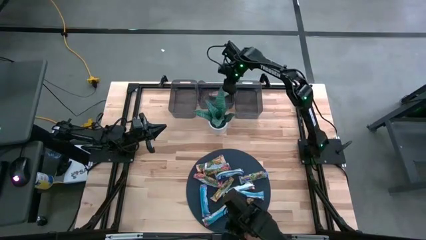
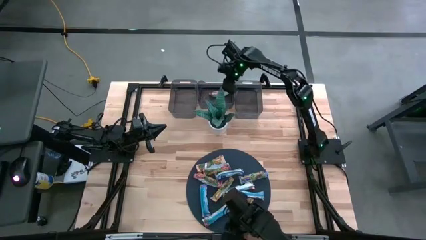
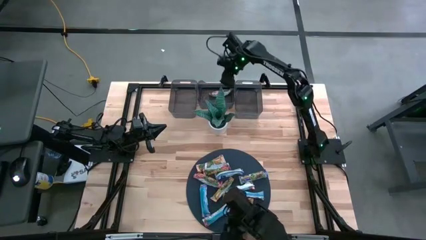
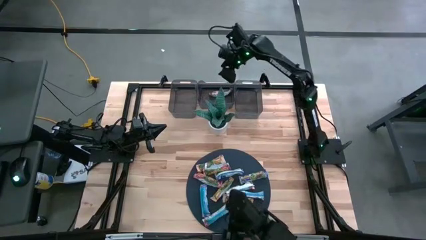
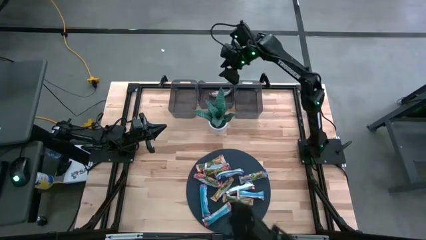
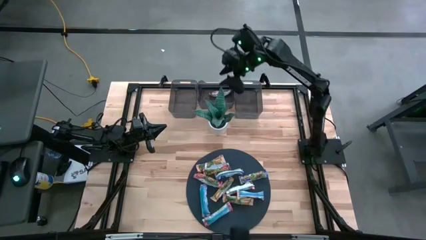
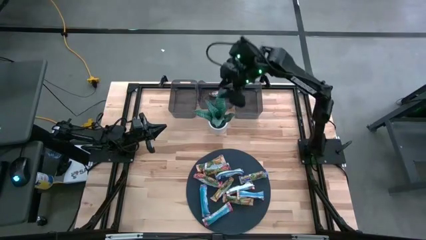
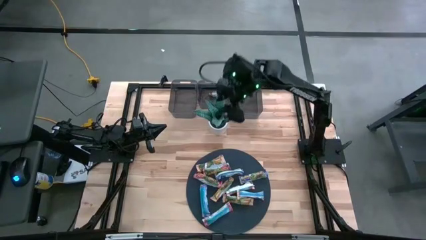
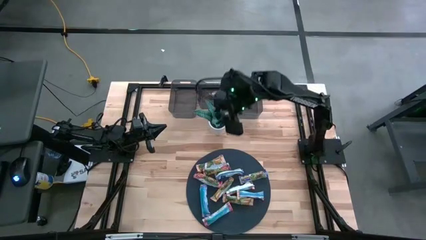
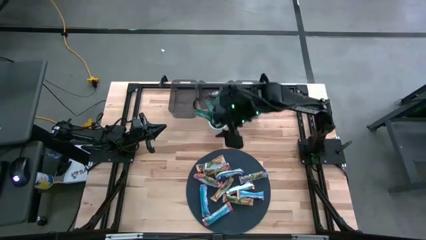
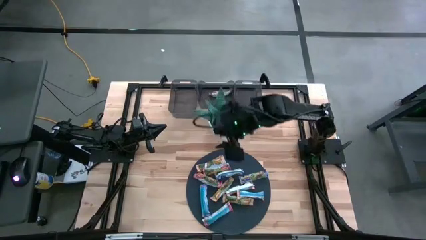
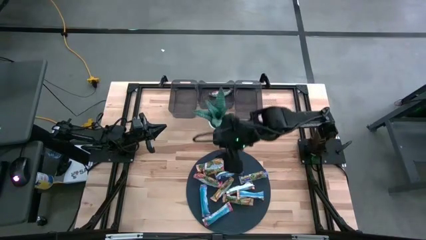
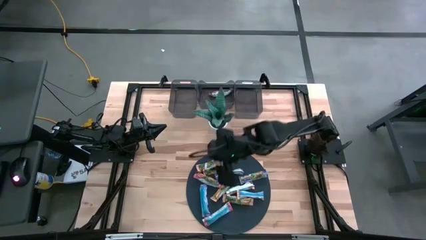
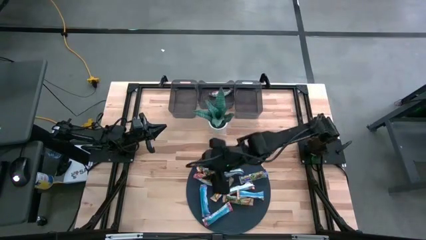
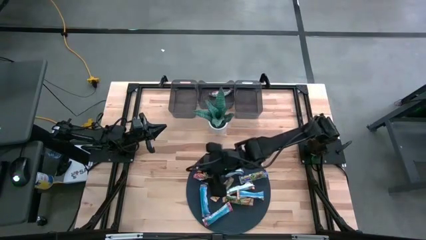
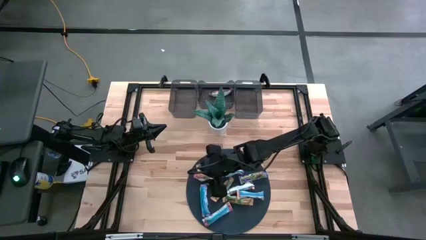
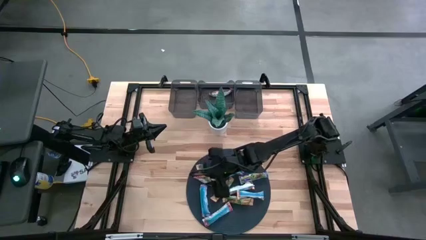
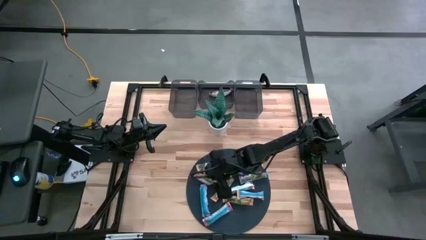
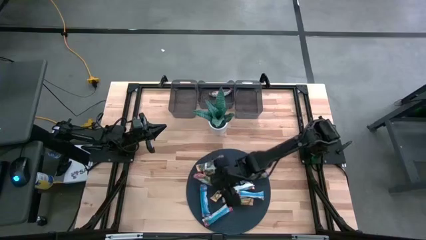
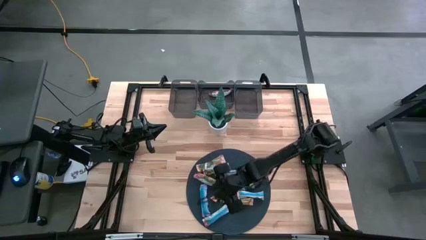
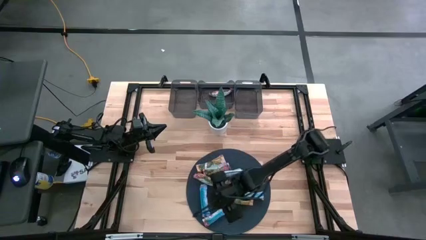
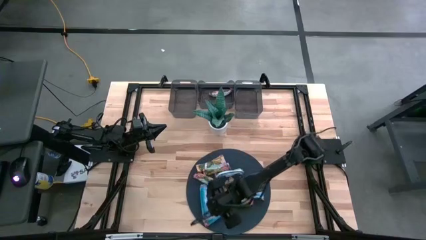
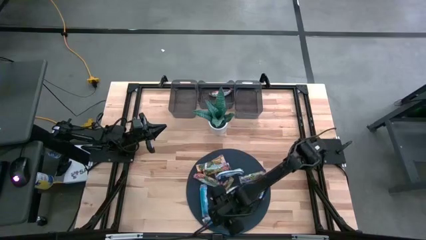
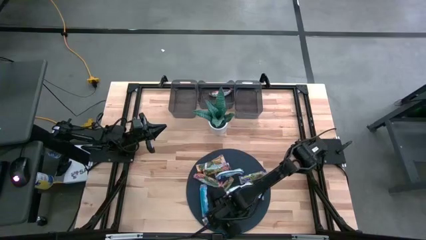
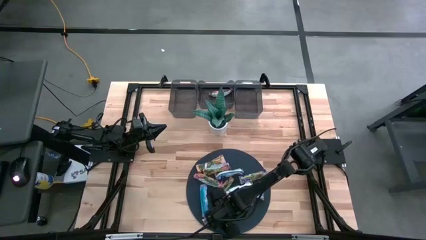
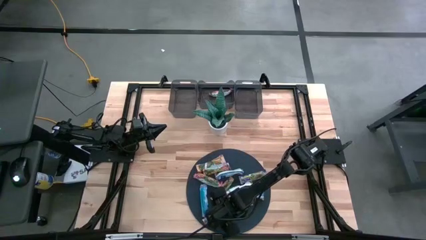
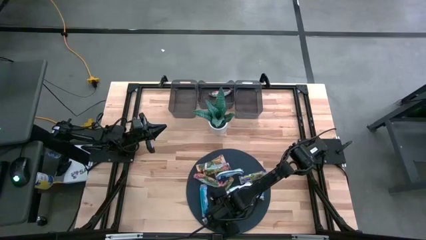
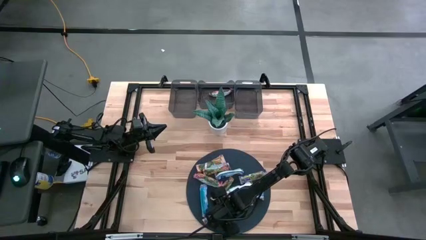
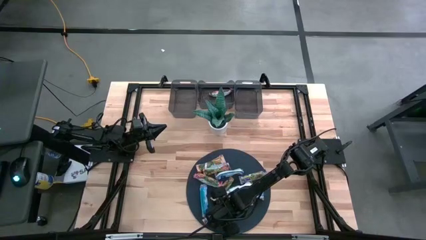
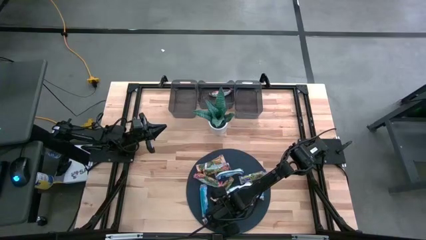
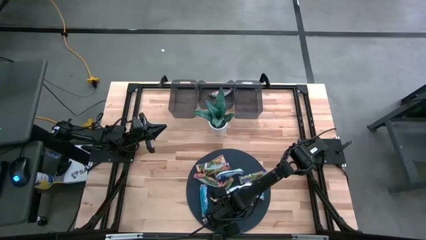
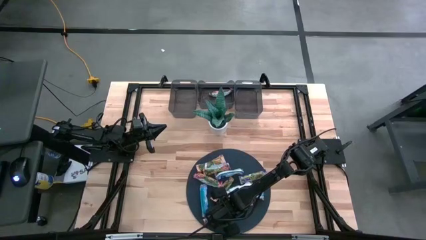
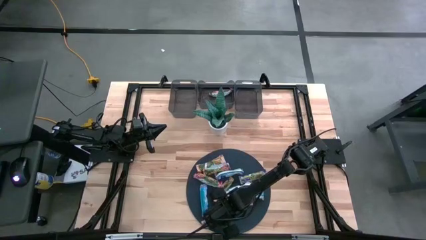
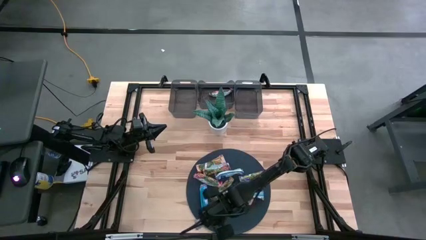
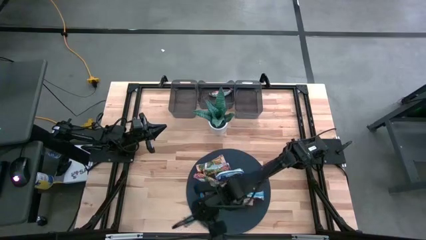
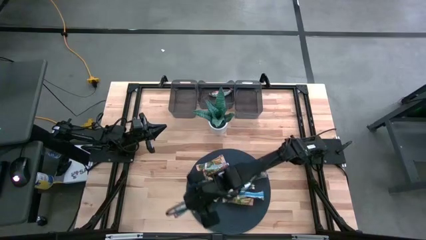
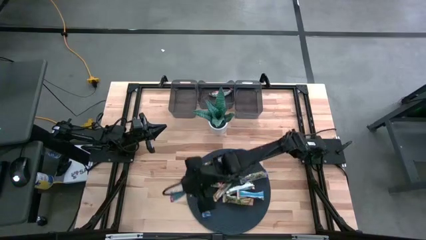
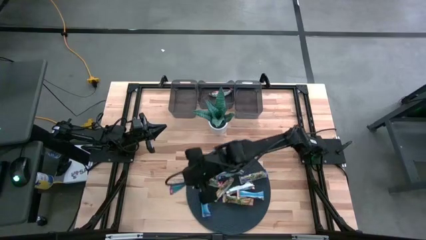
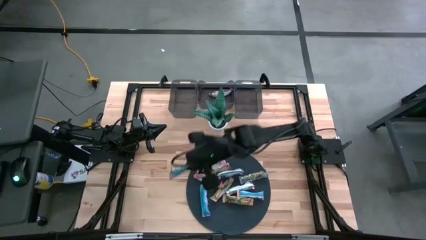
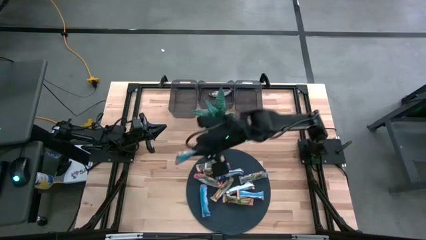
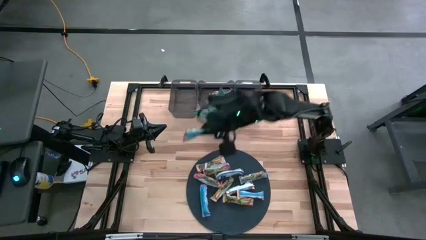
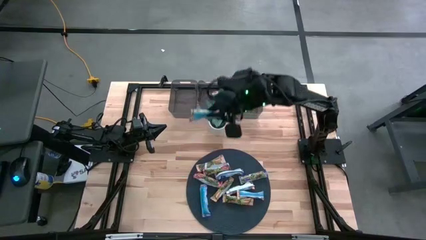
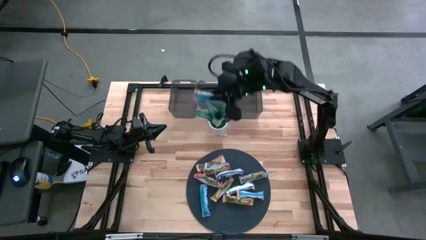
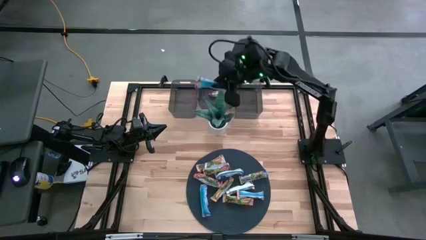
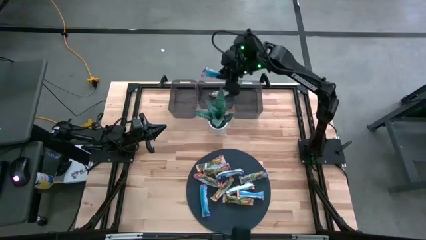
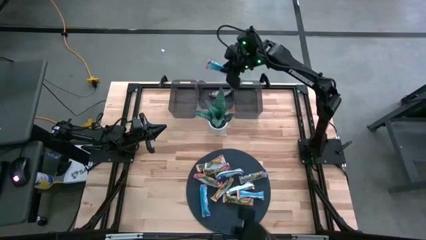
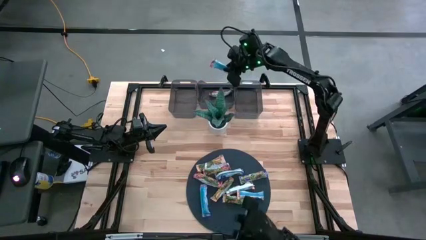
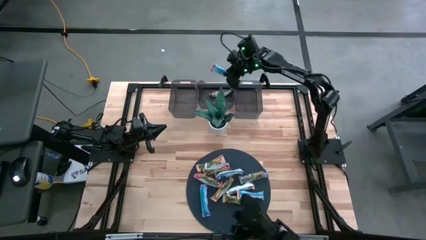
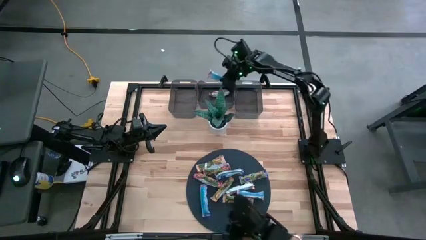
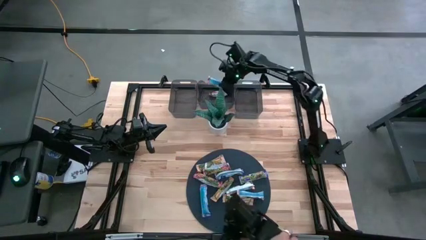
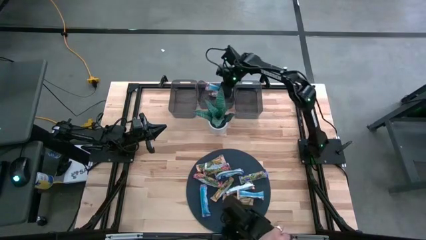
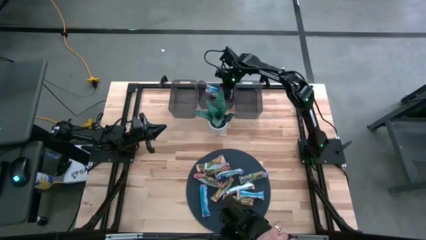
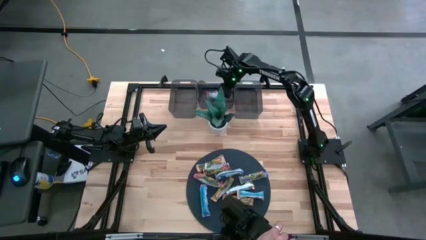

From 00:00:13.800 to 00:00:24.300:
Task: Pick and place Granola Bars by type
Put the red granola bar into the middle black bin

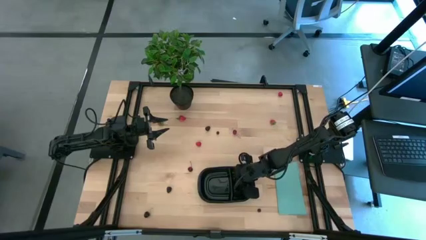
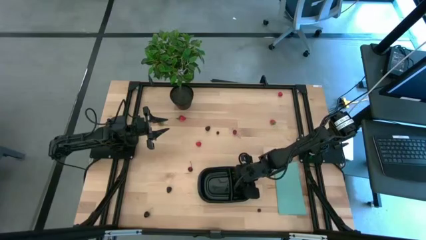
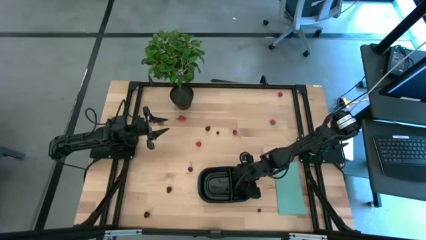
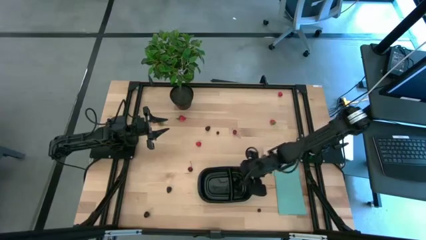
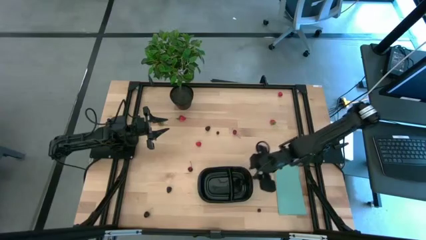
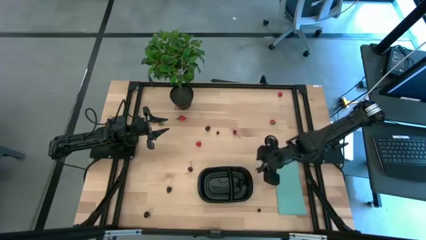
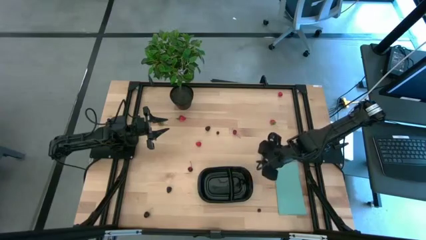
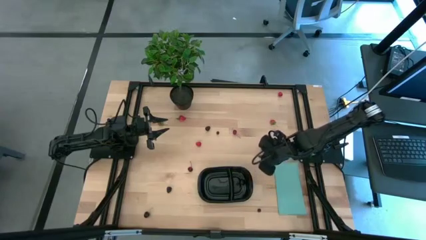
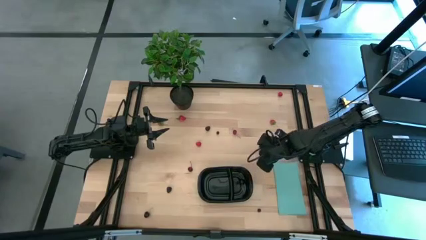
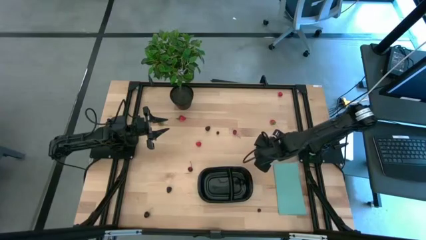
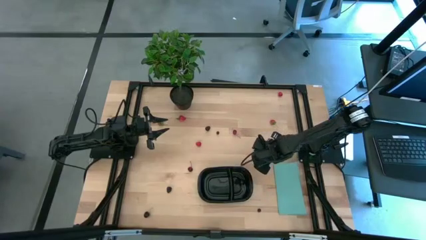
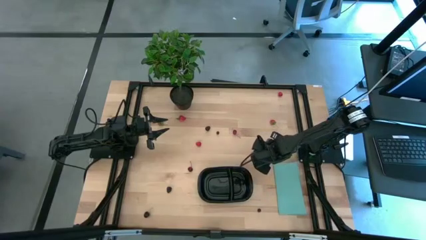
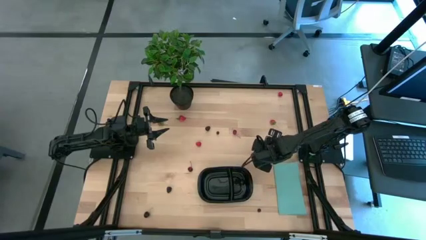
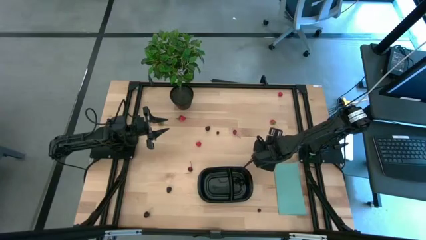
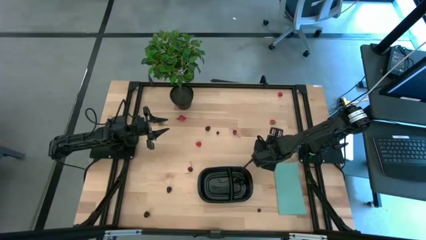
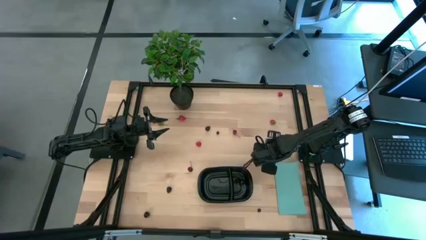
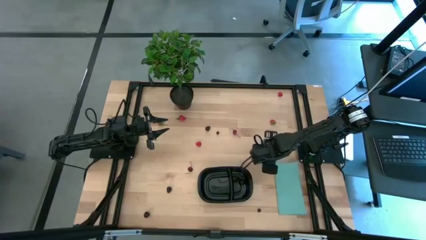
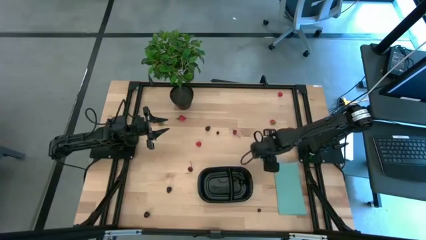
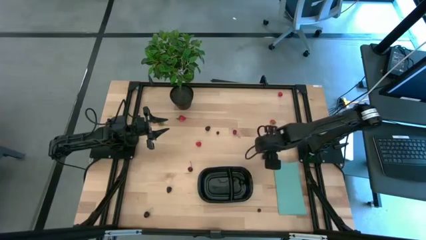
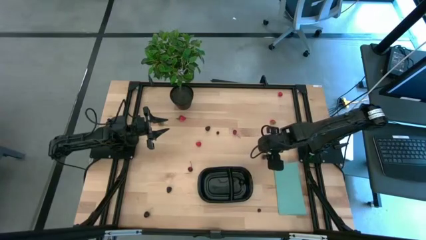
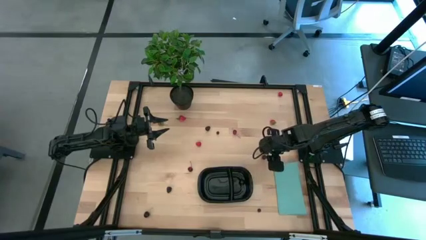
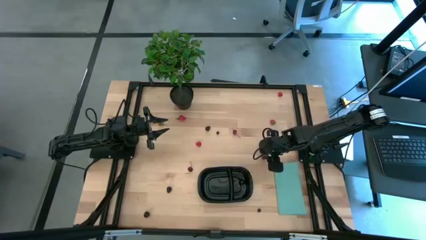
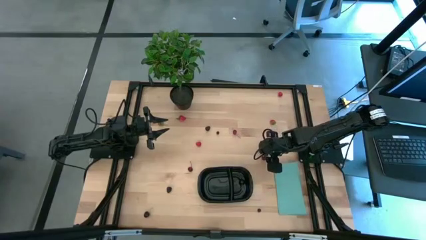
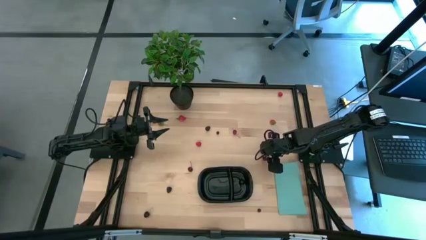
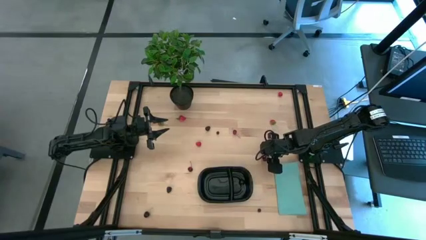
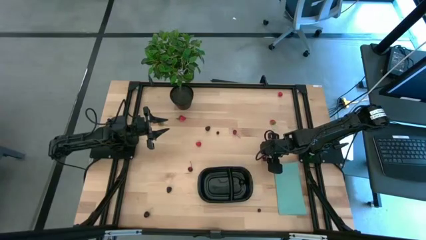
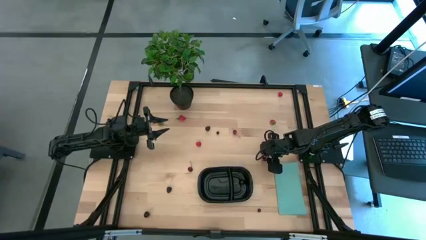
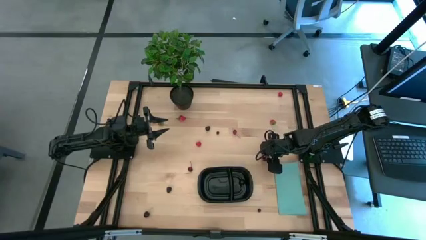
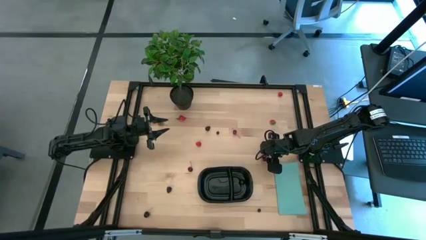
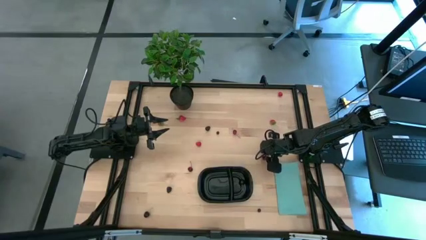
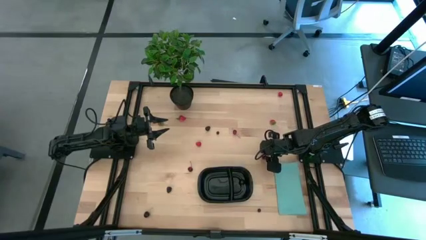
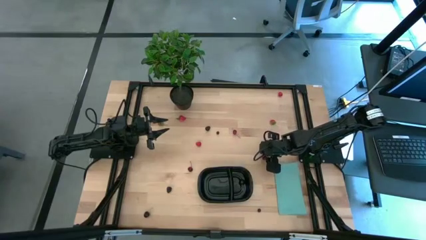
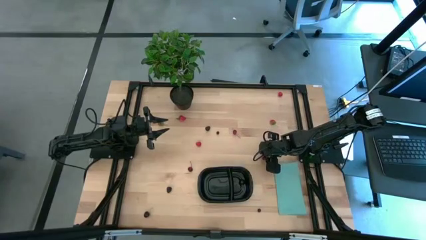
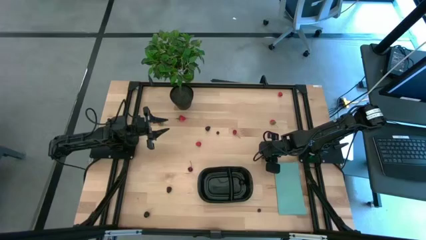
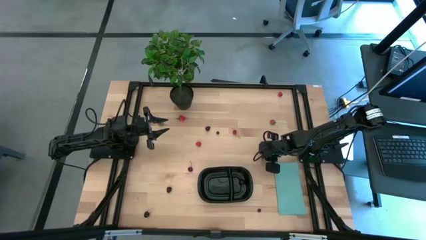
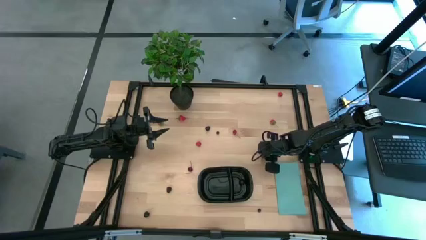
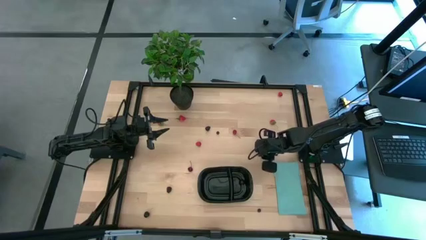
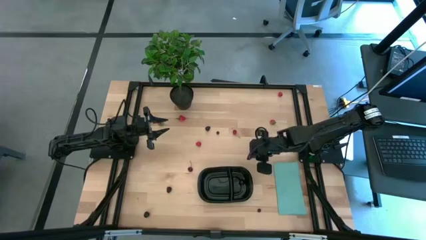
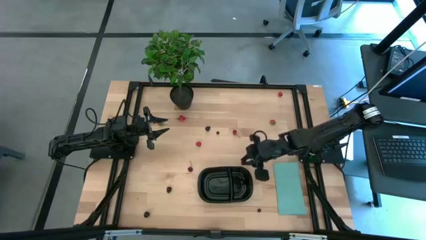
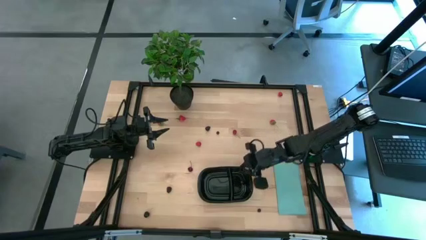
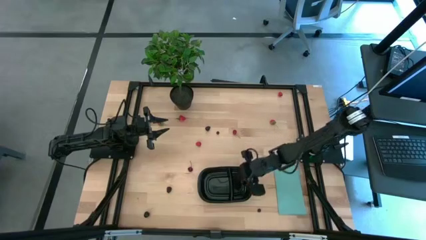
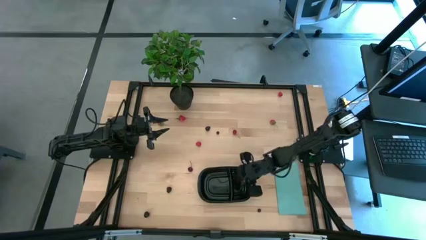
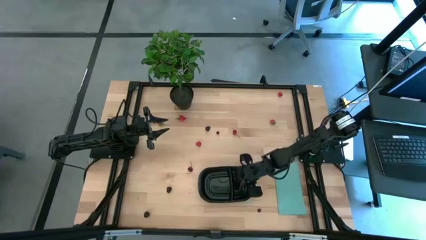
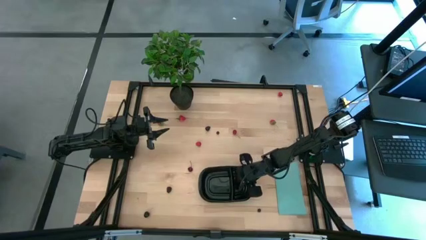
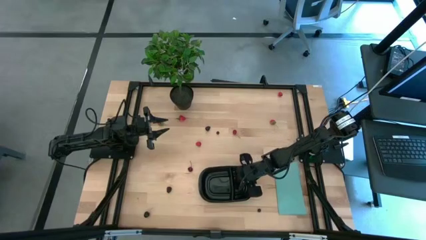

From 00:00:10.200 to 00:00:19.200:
Task: Pick and placing Produce into tupperware
Put the right red cherry into the right side of the black container
